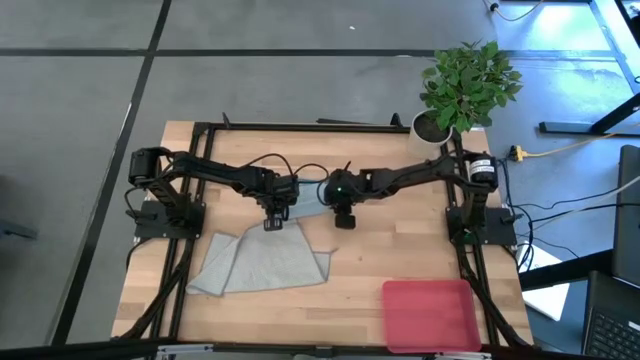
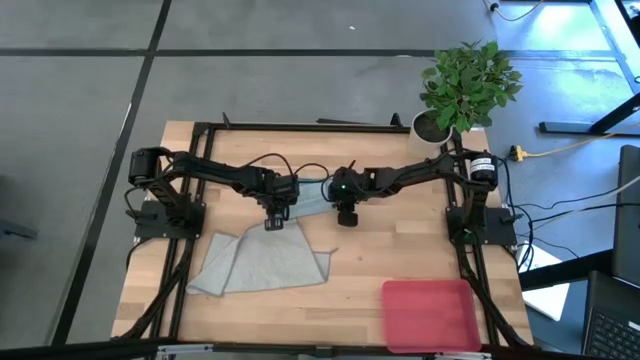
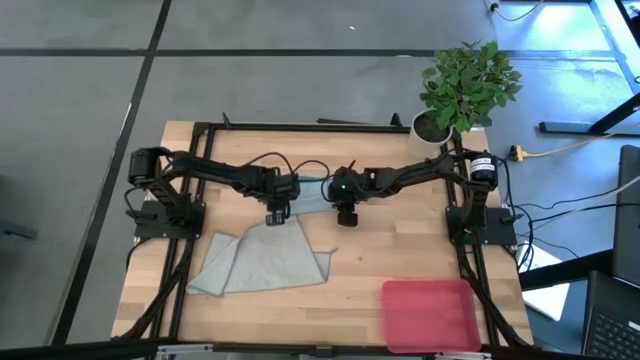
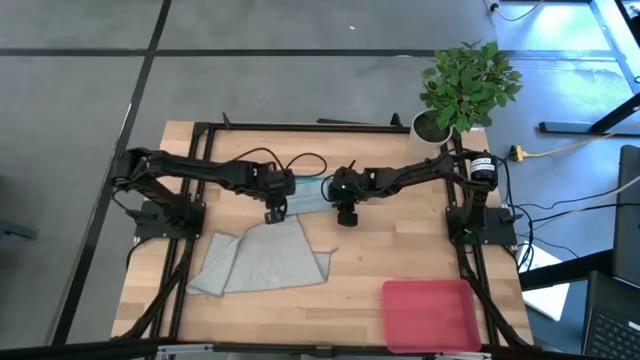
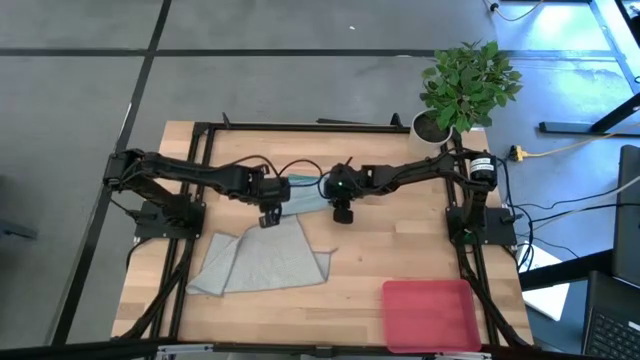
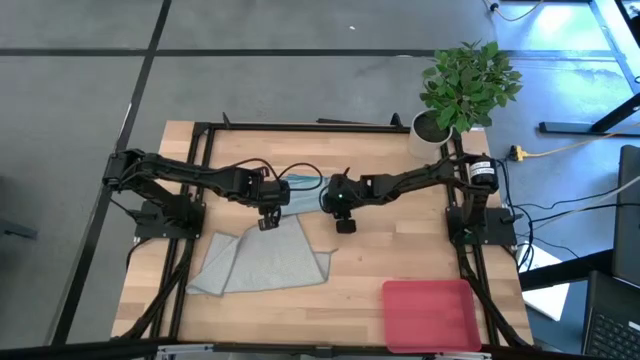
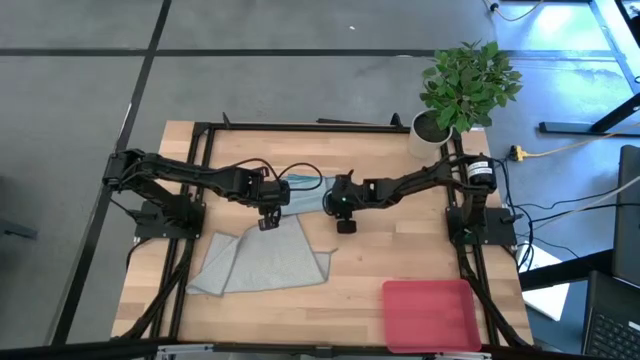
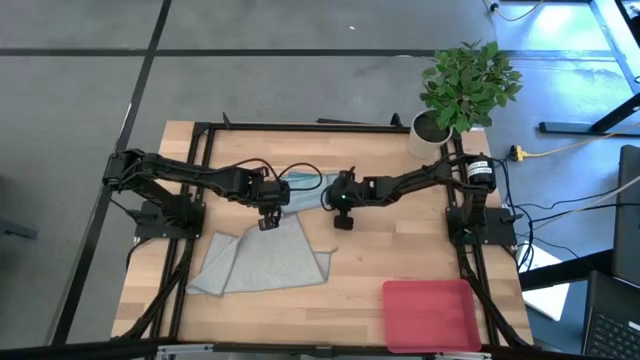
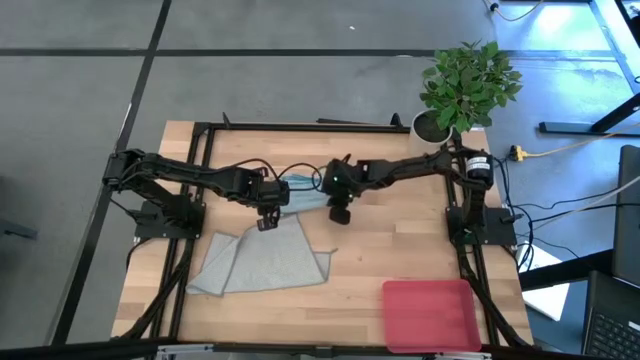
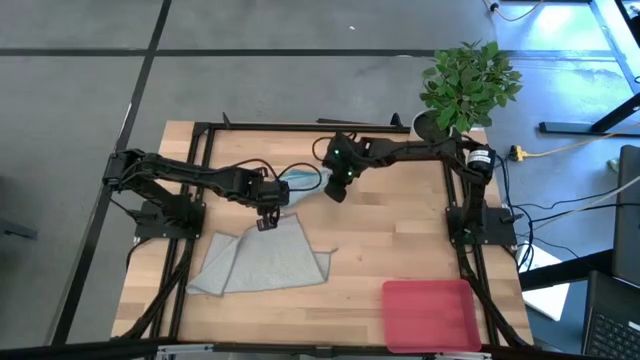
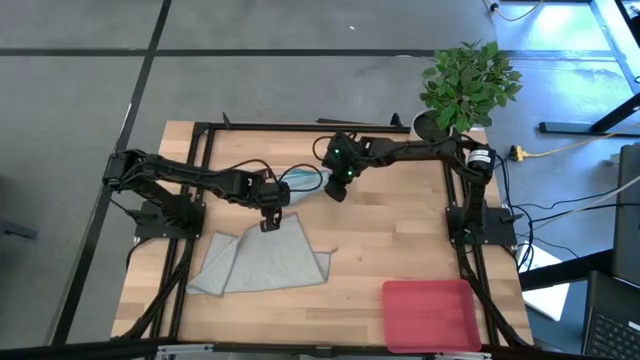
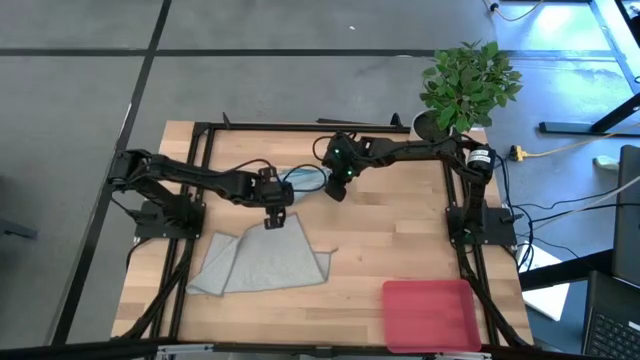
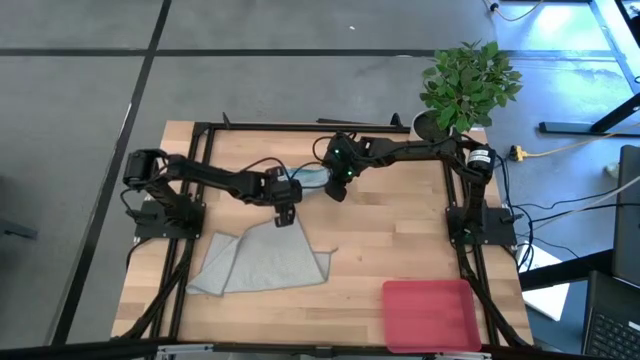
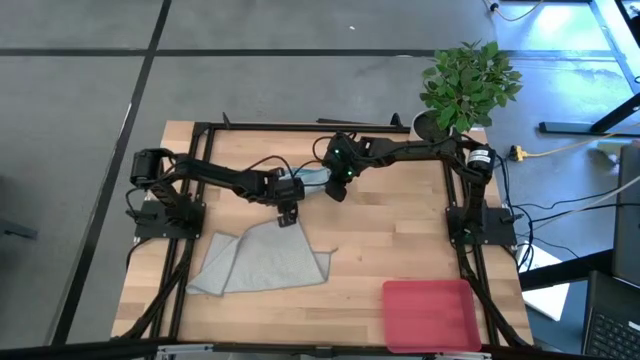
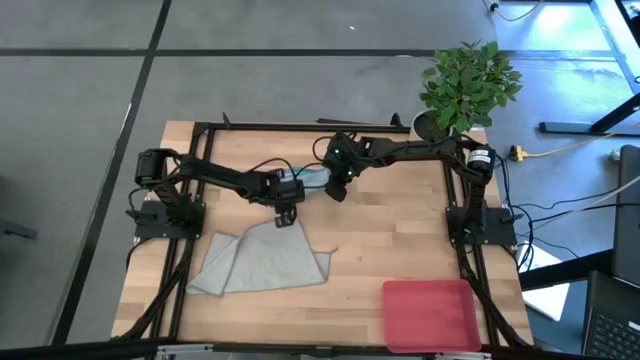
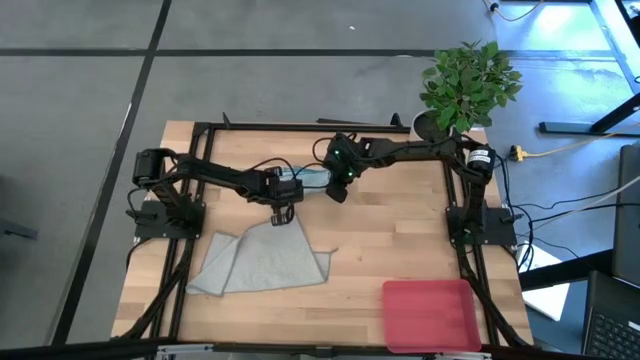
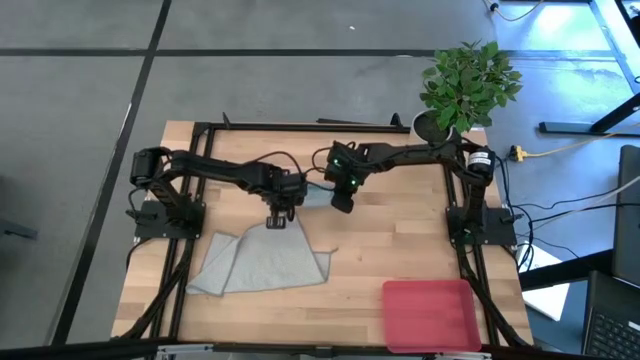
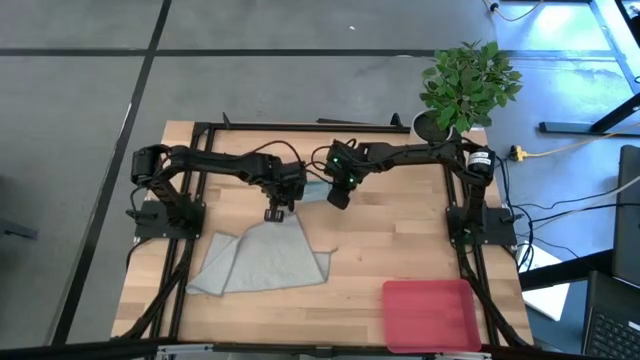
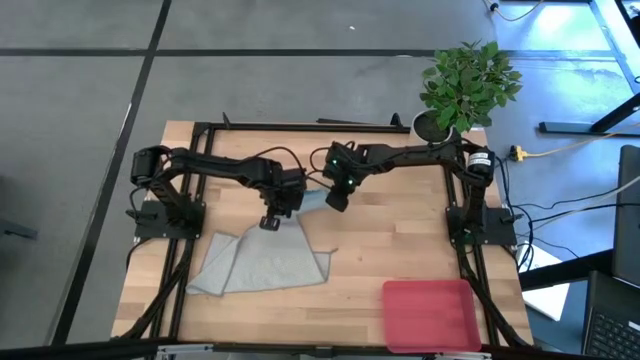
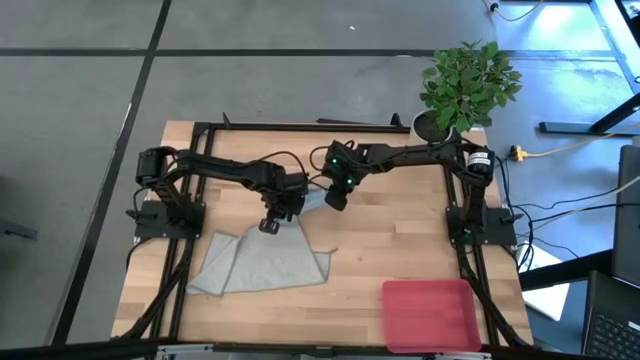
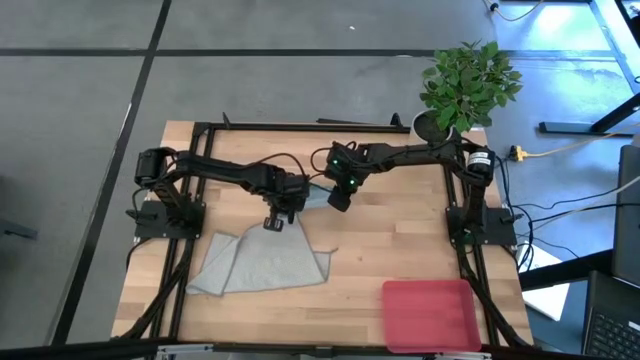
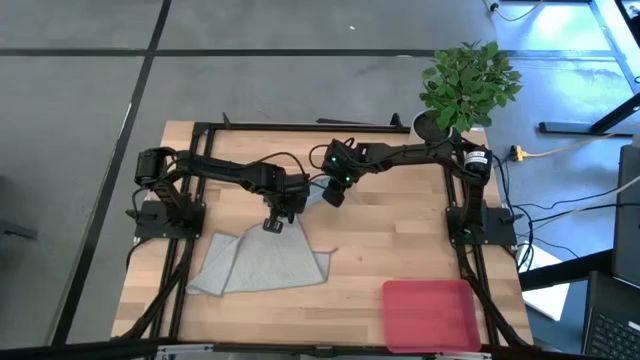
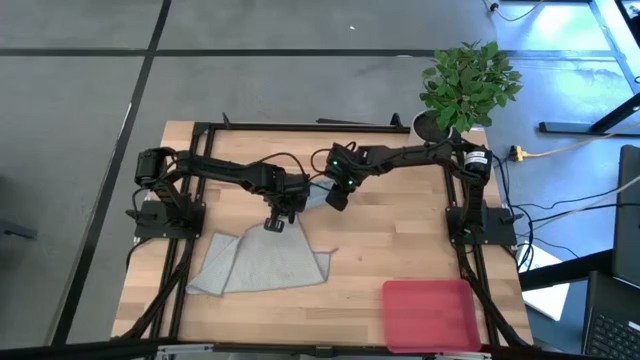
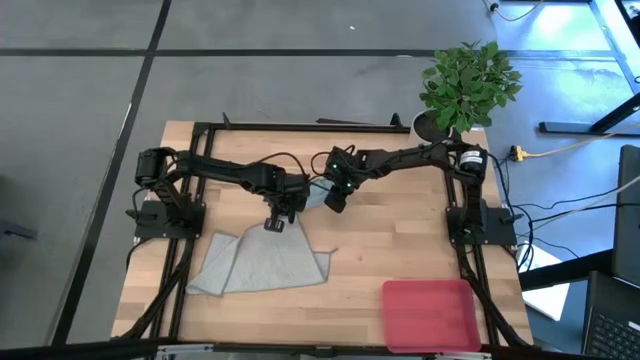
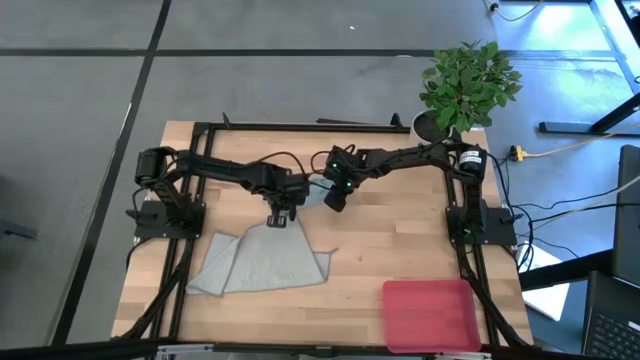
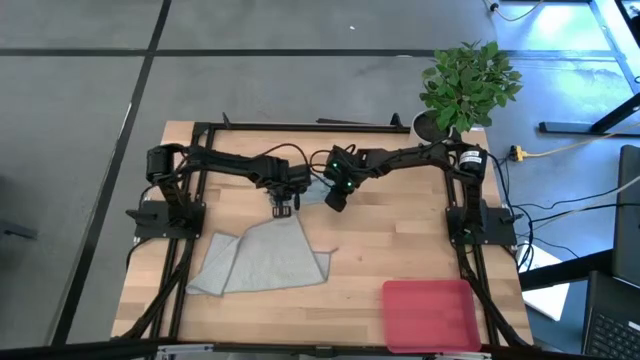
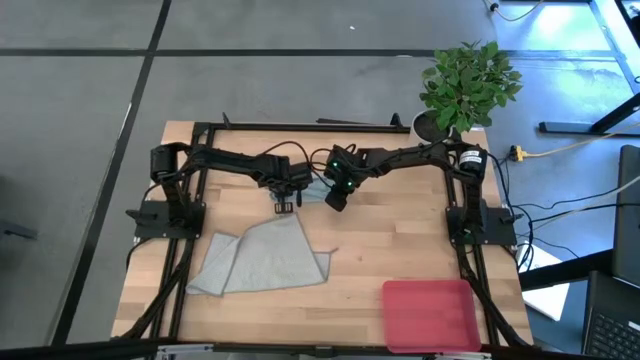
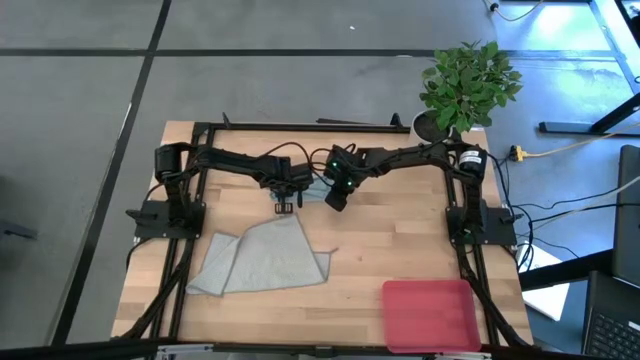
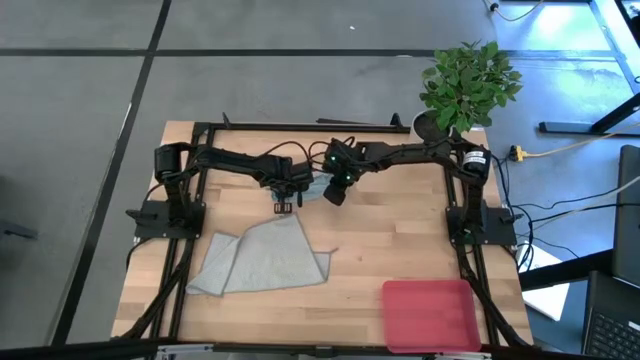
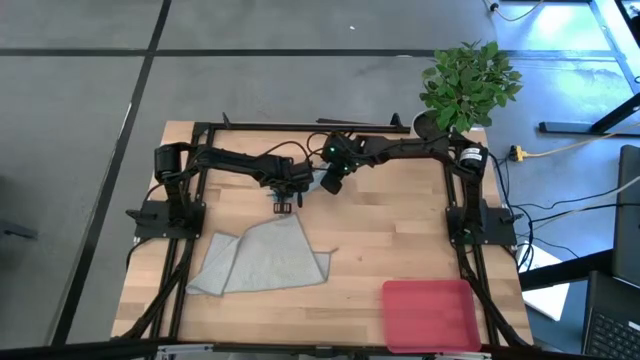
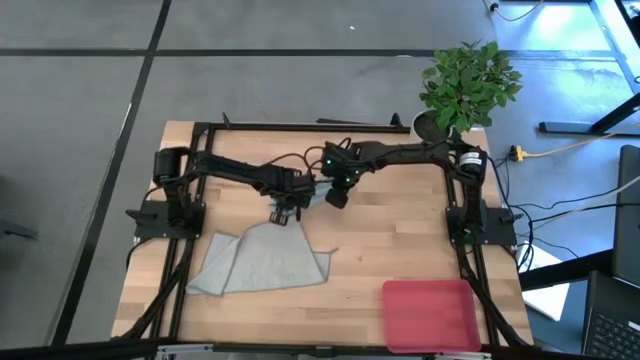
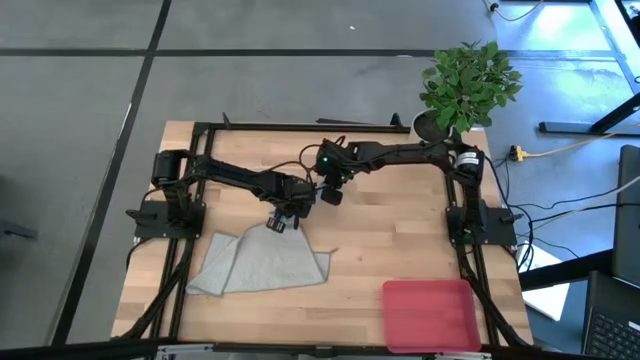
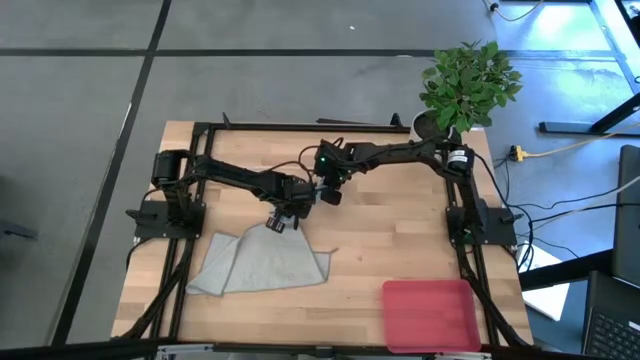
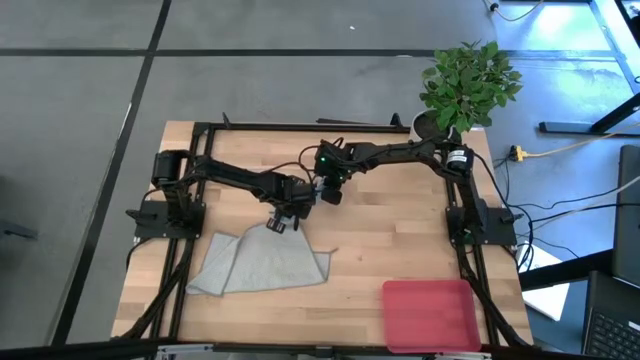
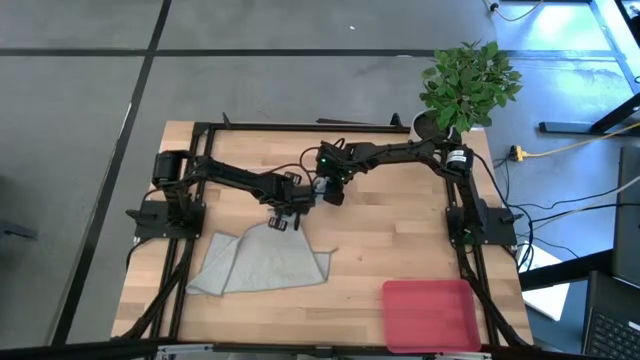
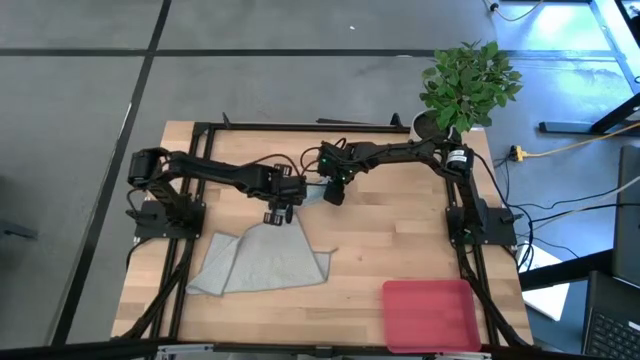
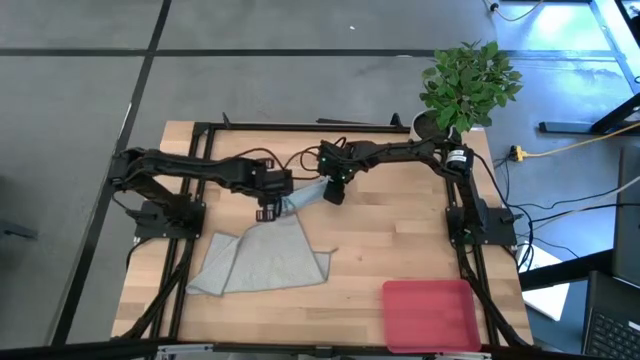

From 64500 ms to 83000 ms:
Task: Roll microfiber towels into tight, uniform cylinder then place into a basket
Roll blue towel
